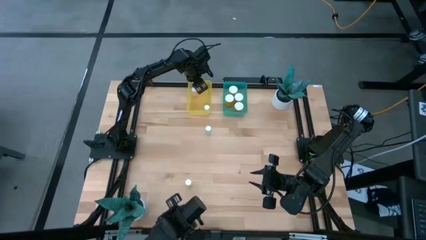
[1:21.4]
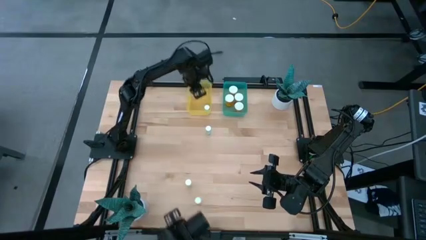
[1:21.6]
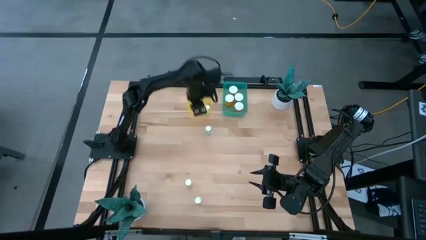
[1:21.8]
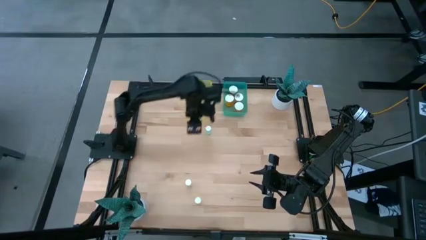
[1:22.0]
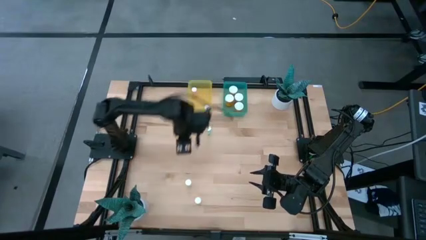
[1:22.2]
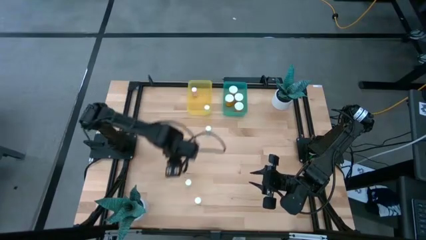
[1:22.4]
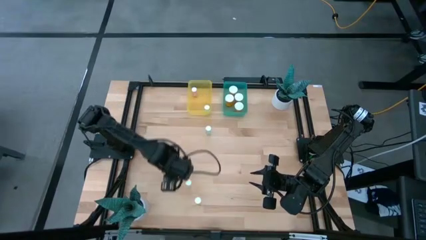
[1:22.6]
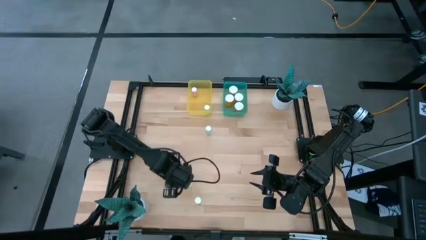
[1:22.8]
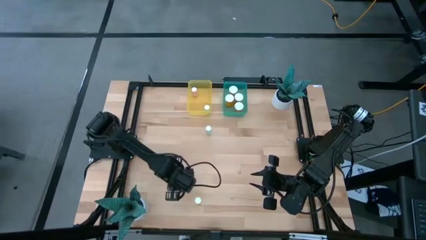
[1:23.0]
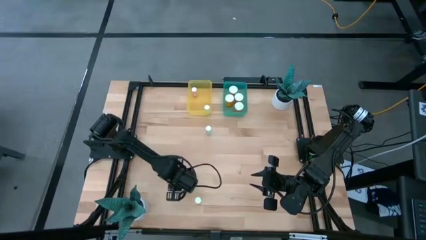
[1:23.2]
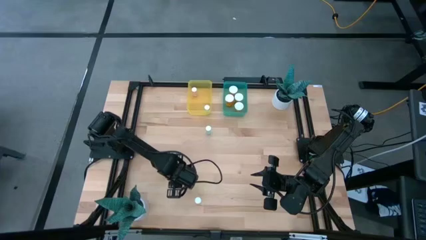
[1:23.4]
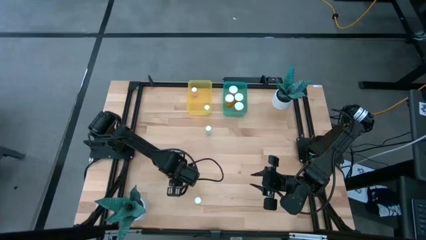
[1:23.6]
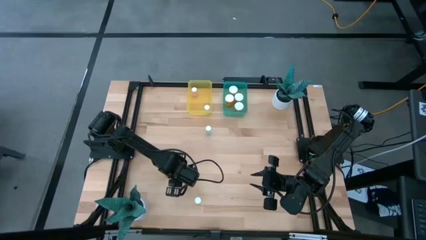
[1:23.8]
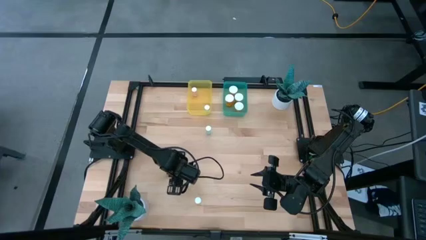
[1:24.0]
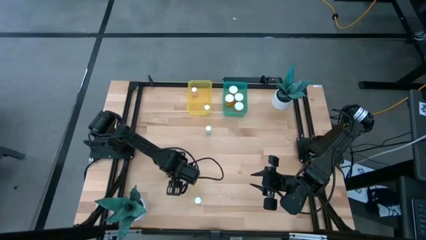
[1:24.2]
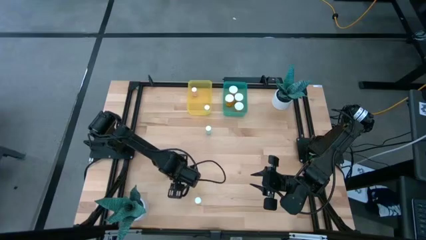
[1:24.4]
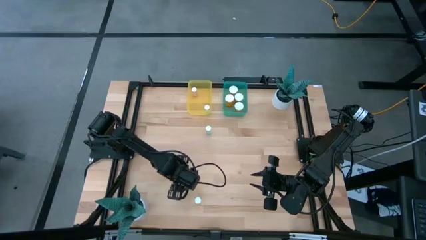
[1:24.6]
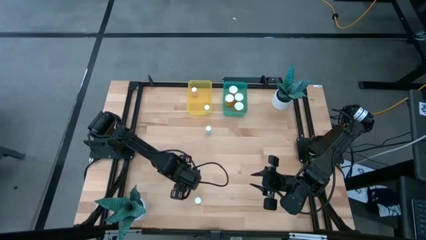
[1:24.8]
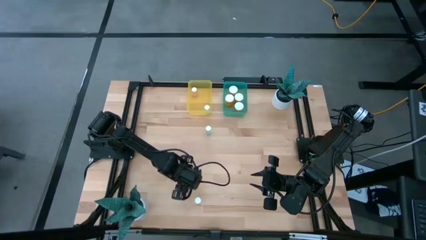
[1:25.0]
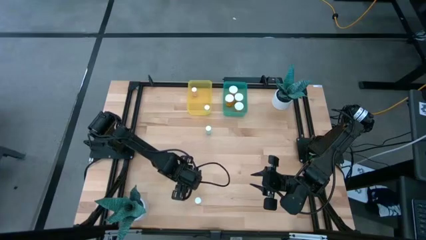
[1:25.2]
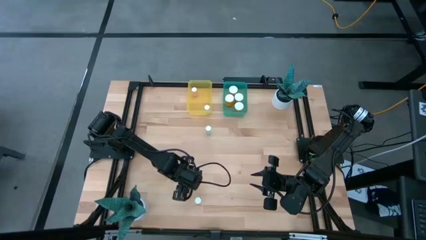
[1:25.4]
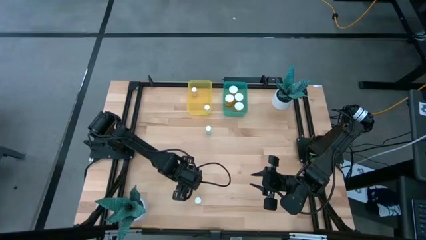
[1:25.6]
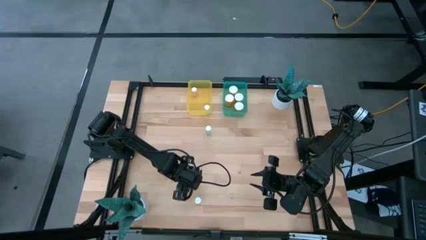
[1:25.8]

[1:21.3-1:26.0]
Task: Pick and place medicine bottles into bin by pill shape (circle, oval)
Put the yellow tablet bottle into the yellow bin

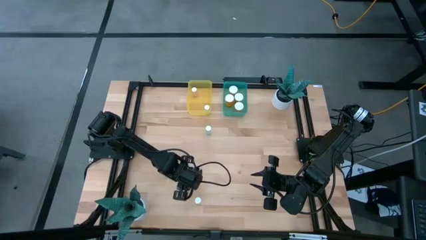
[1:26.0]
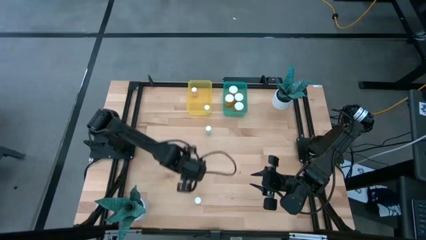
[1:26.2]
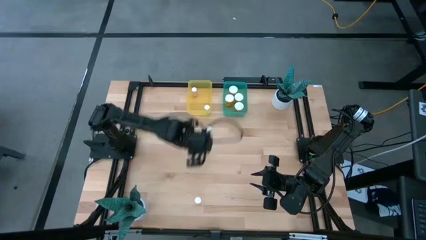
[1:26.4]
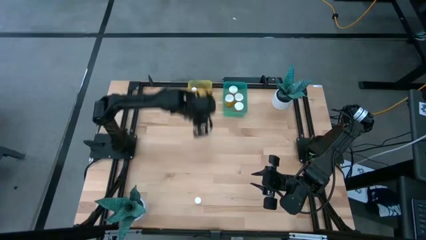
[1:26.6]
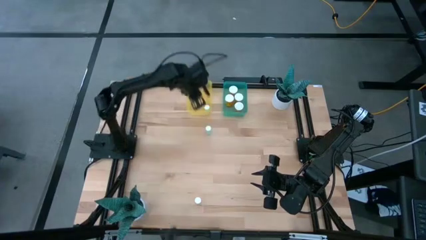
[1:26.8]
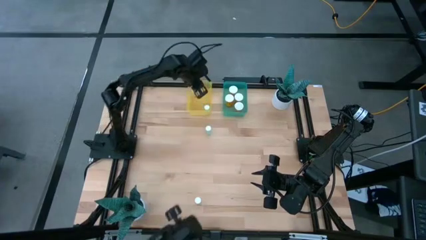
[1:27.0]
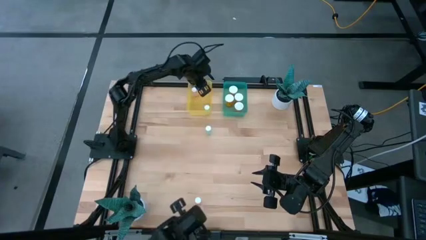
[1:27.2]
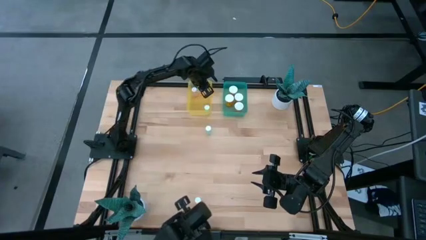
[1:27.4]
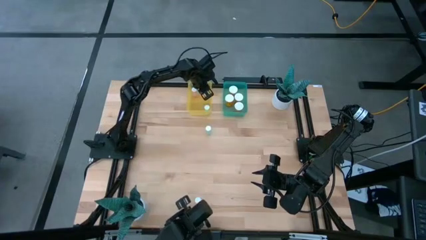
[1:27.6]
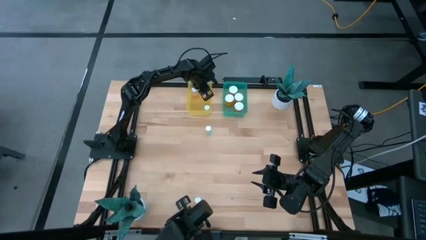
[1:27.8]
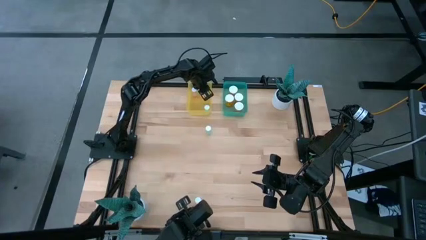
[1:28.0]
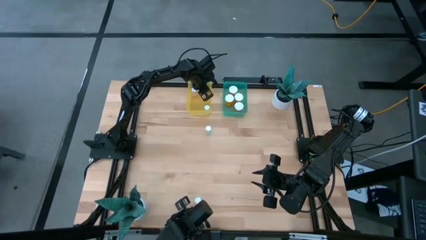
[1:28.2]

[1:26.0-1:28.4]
Put the yellow tablet bottle into the yellow bin

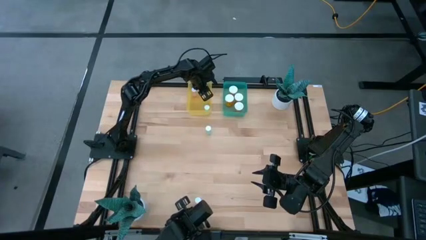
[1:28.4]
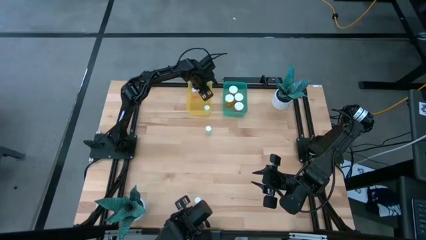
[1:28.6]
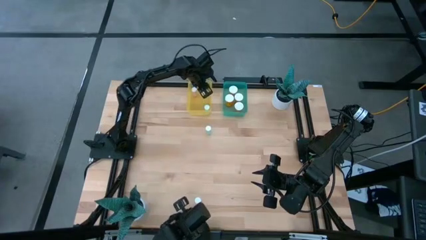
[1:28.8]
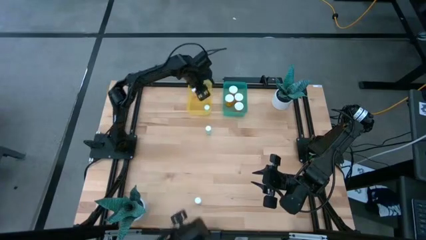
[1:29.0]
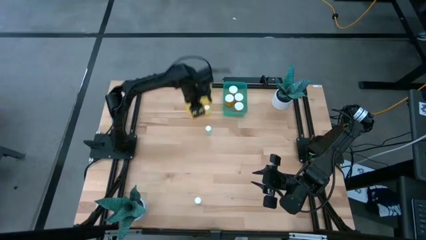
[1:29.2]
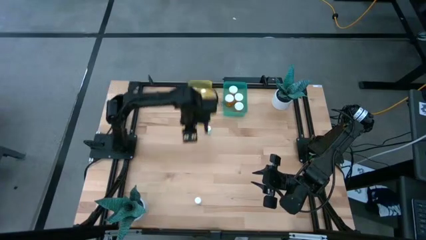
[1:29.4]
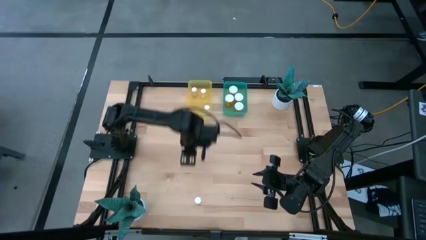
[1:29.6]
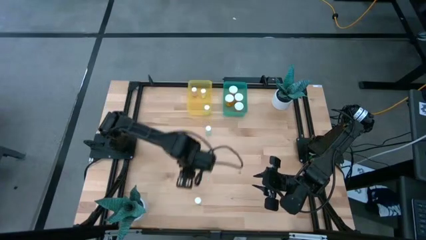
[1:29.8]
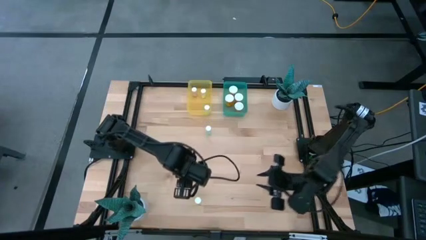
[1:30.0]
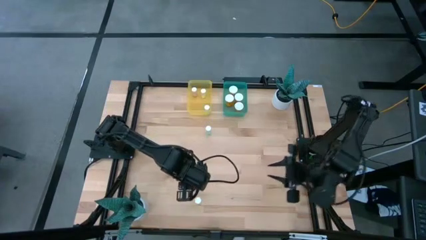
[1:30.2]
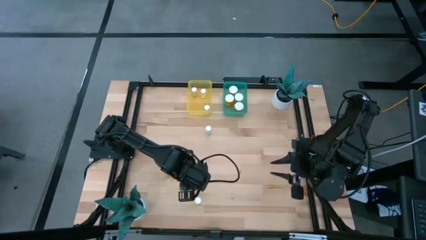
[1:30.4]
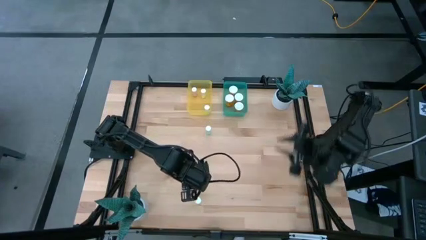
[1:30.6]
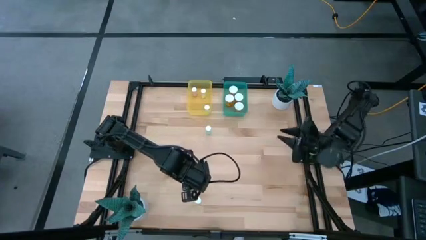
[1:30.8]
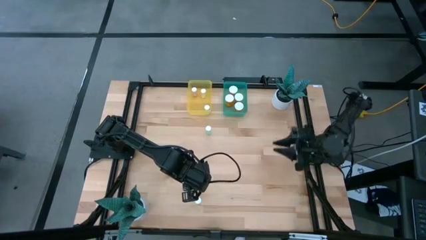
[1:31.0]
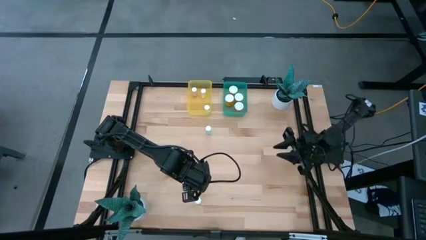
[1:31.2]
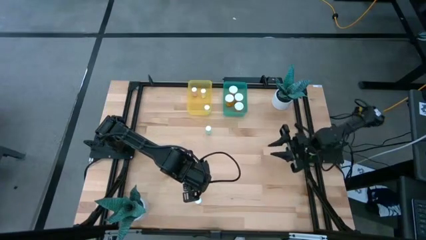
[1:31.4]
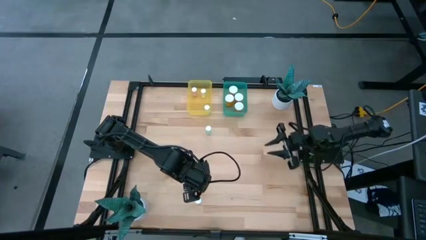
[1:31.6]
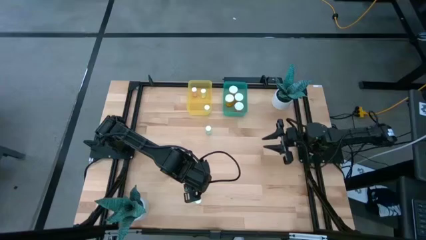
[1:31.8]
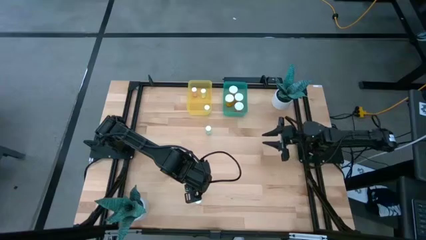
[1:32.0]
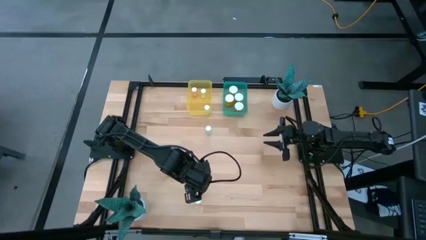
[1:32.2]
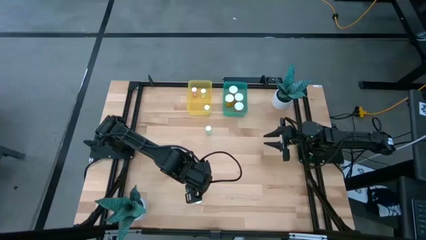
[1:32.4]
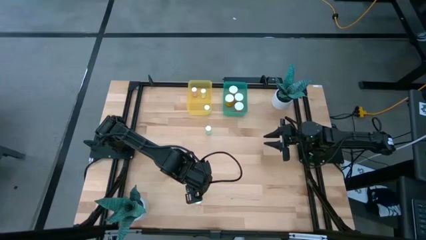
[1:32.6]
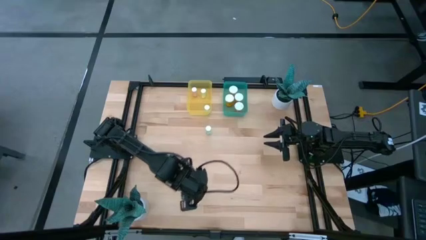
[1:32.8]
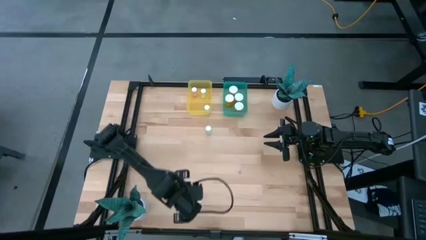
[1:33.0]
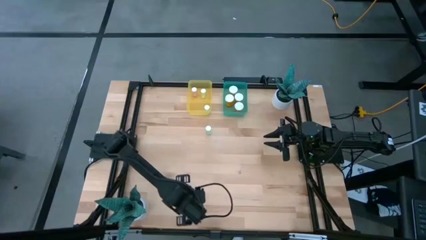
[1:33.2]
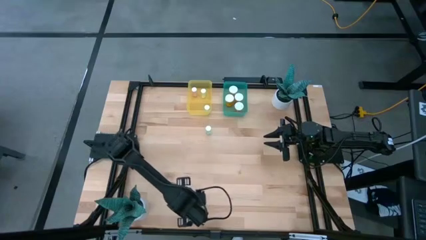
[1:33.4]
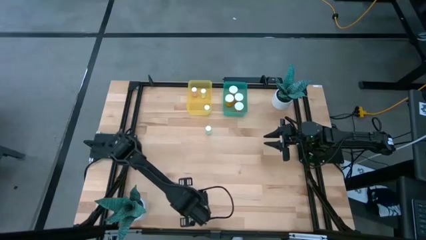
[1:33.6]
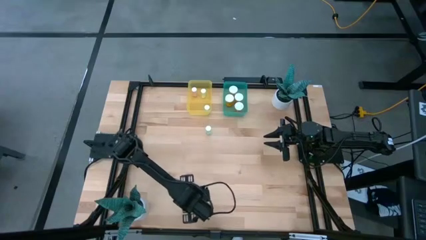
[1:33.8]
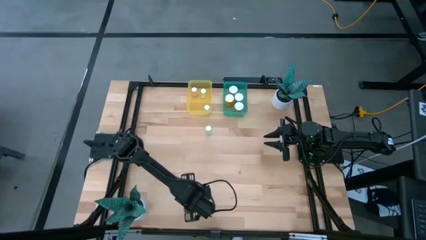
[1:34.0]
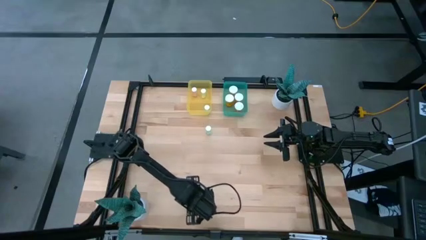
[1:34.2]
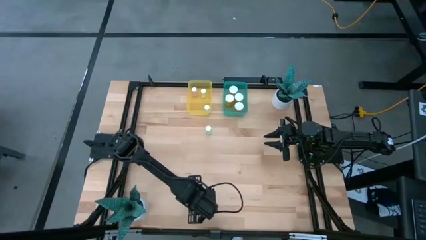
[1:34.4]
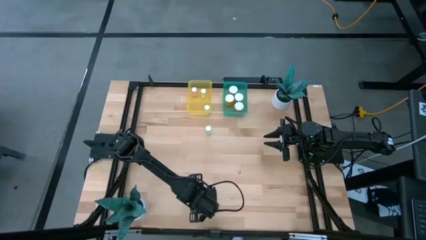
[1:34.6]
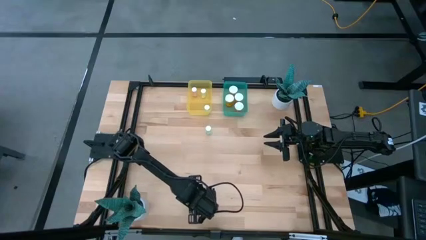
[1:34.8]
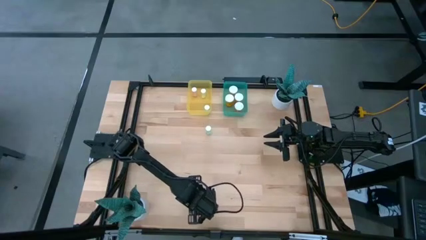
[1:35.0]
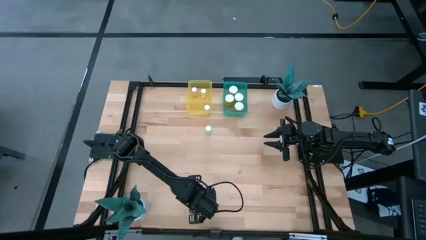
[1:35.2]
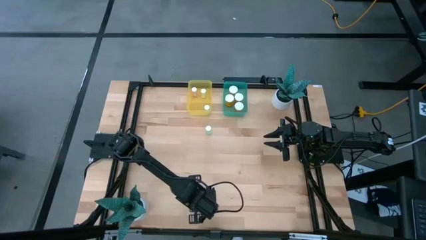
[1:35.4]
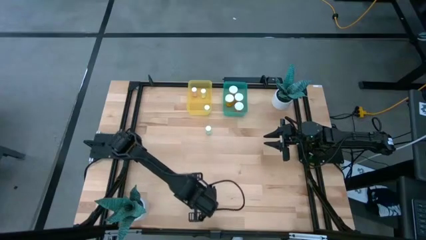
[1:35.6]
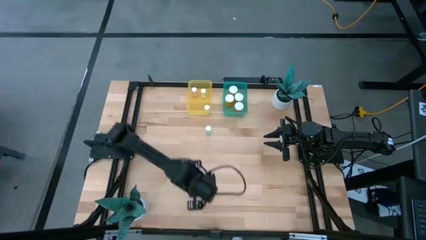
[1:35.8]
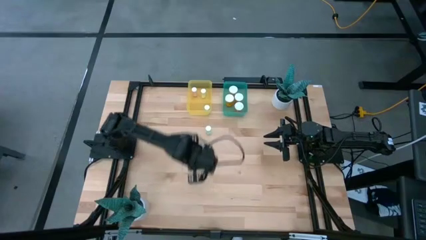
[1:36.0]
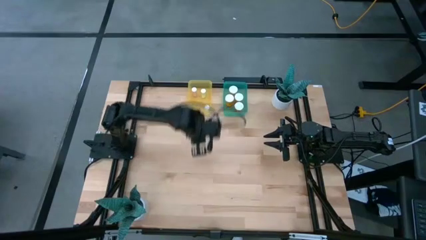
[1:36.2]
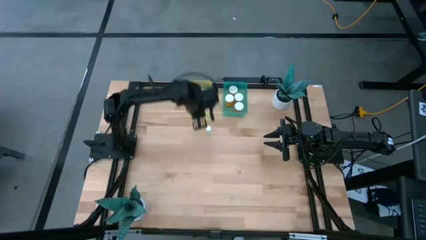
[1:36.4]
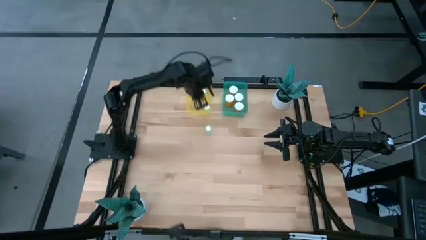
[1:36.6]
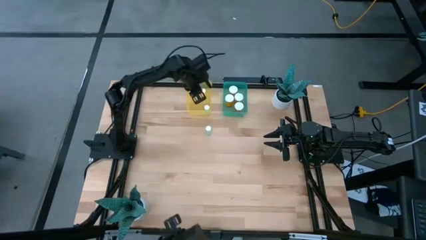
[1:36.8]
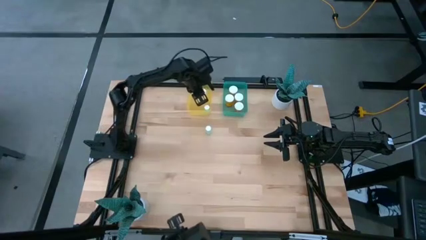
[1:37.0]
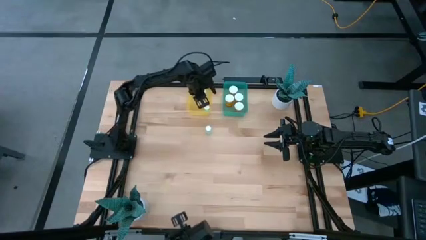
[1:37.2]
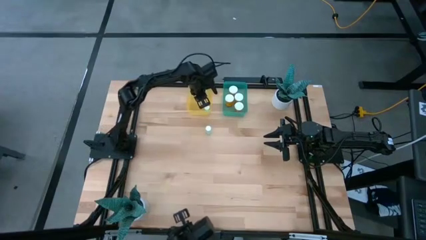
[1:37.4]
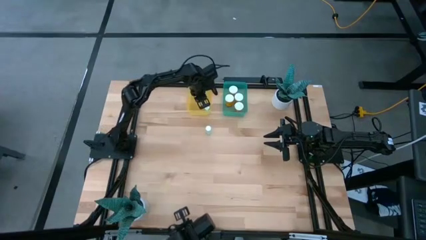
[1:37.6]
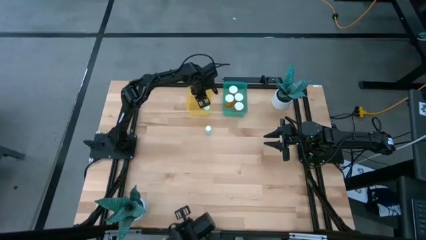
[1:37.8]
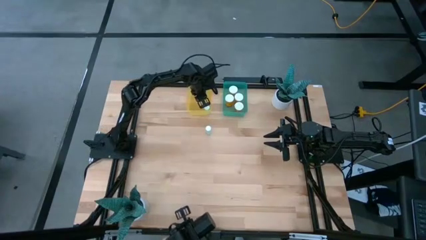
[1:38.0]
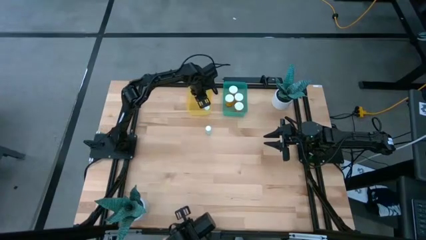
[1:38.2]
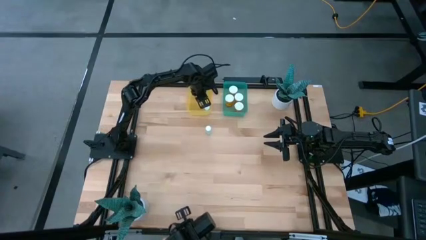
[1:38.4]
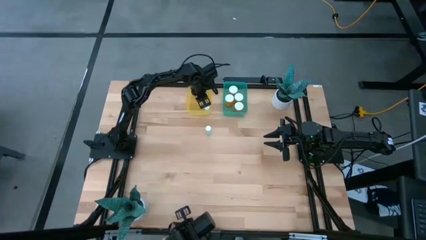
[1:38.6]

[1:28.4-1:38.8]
Put the yellow tablet bottle into the yellow bin
